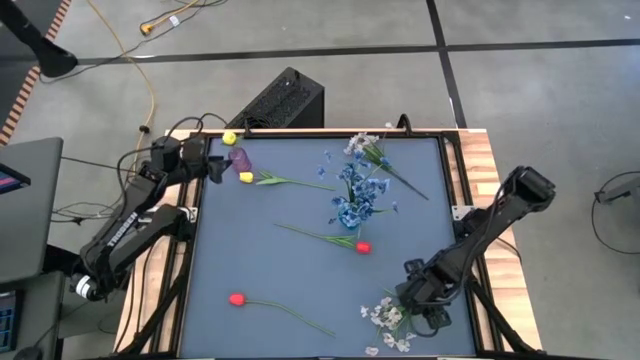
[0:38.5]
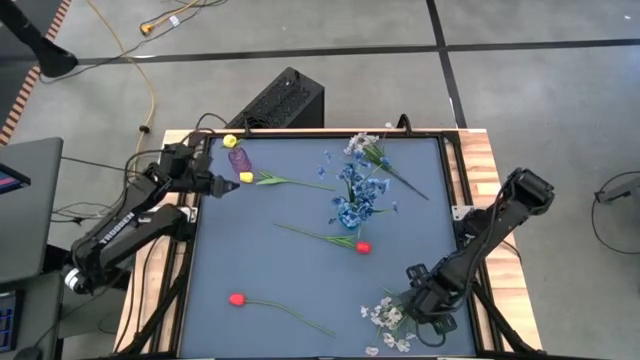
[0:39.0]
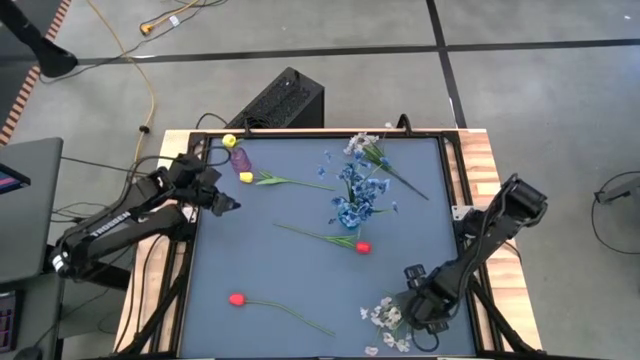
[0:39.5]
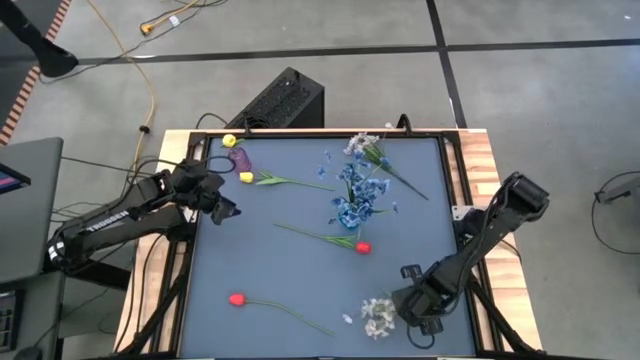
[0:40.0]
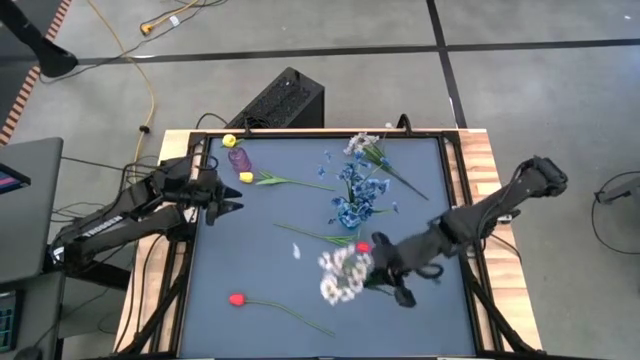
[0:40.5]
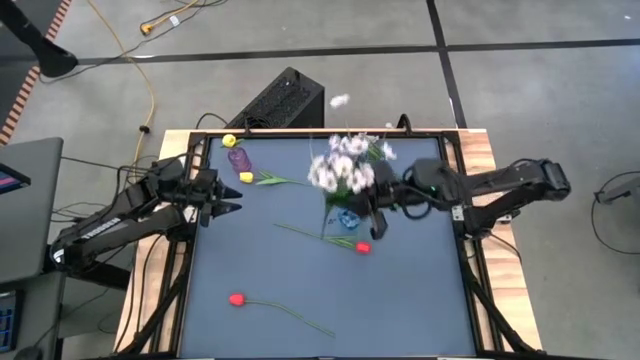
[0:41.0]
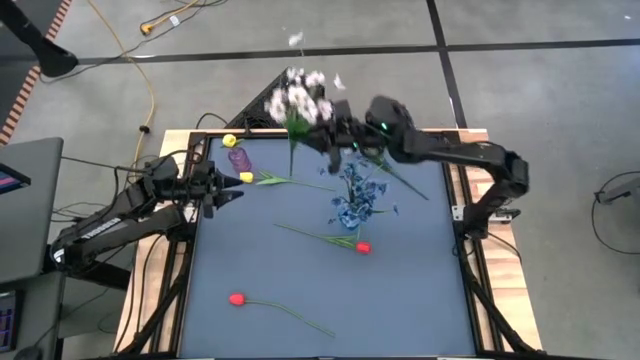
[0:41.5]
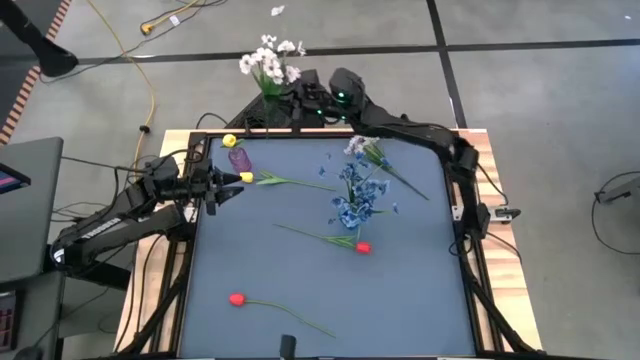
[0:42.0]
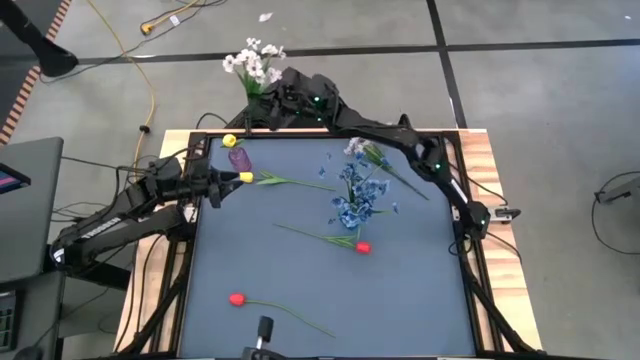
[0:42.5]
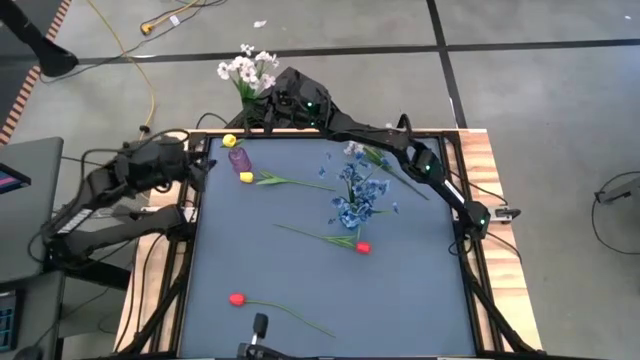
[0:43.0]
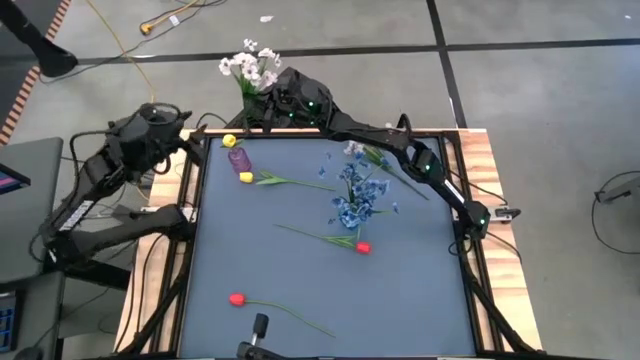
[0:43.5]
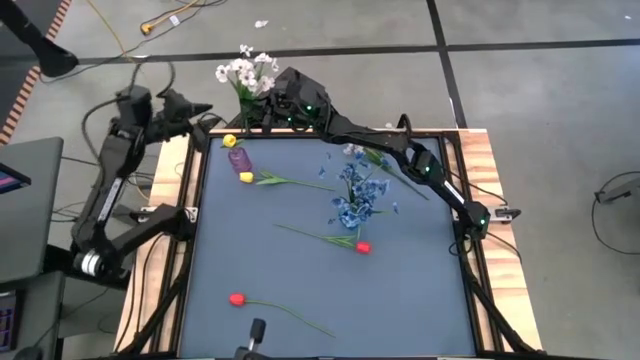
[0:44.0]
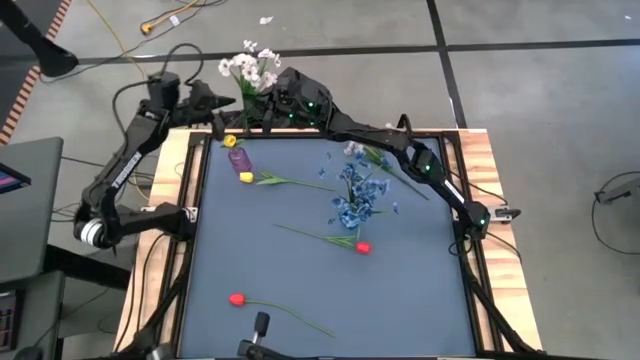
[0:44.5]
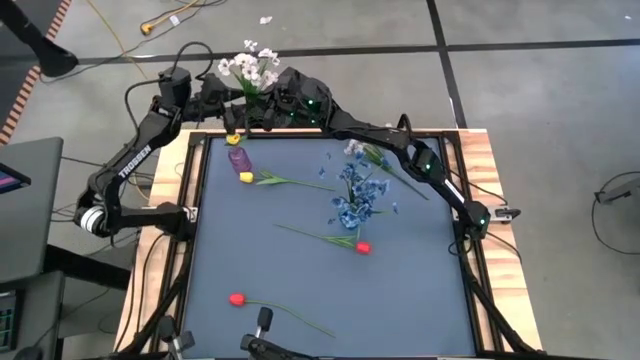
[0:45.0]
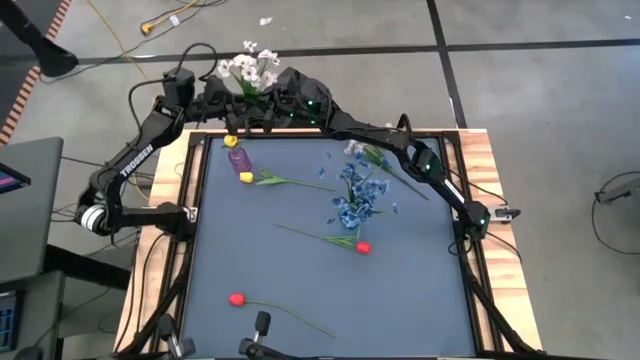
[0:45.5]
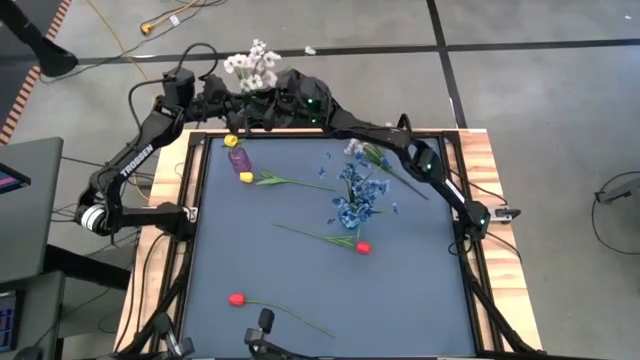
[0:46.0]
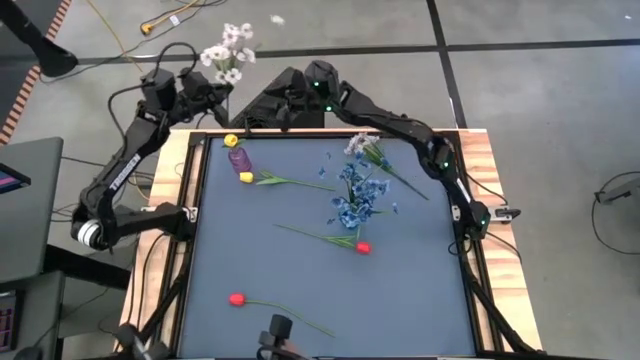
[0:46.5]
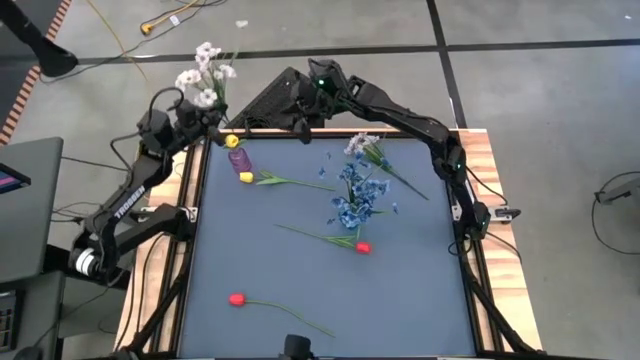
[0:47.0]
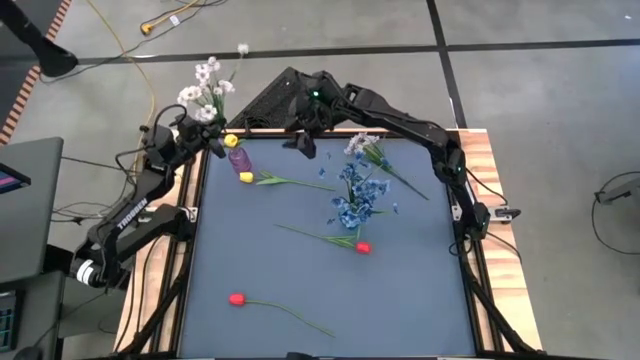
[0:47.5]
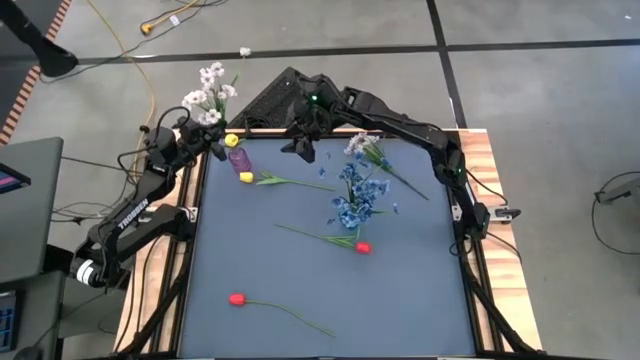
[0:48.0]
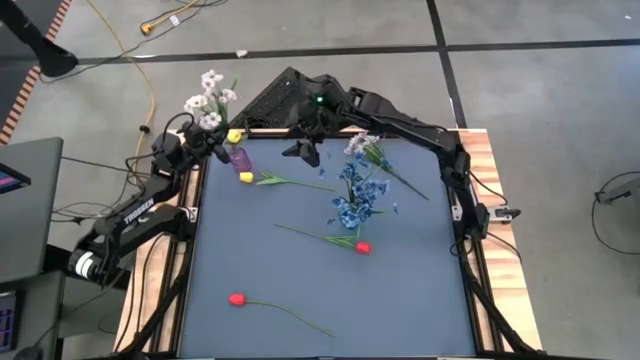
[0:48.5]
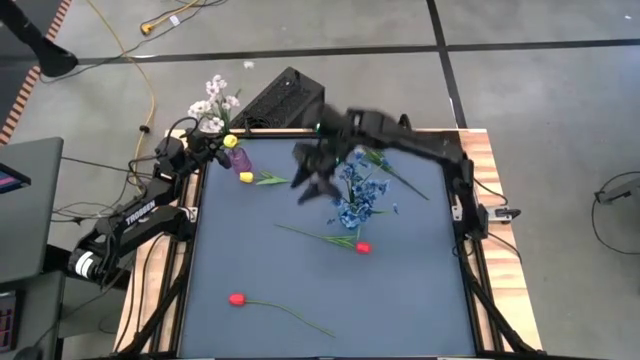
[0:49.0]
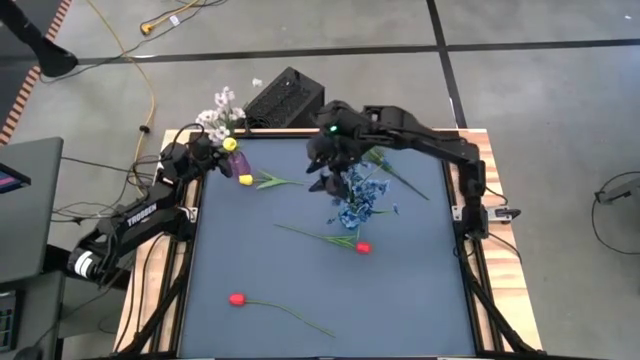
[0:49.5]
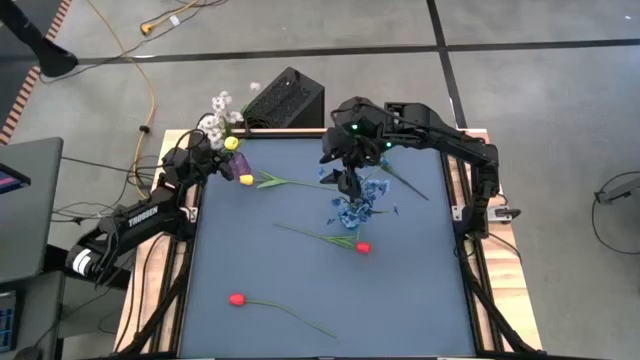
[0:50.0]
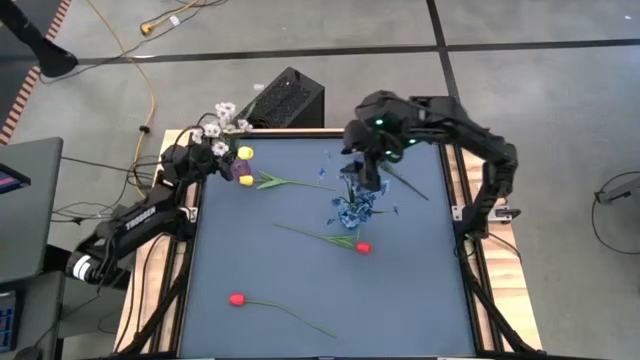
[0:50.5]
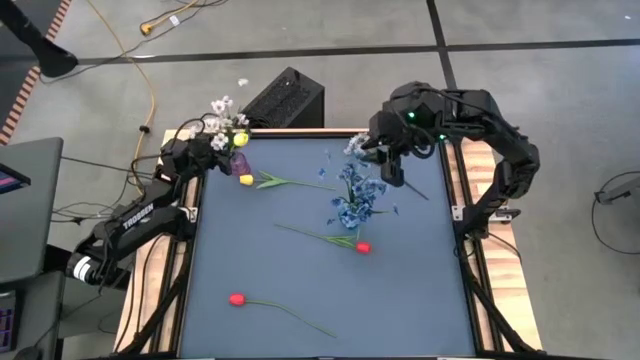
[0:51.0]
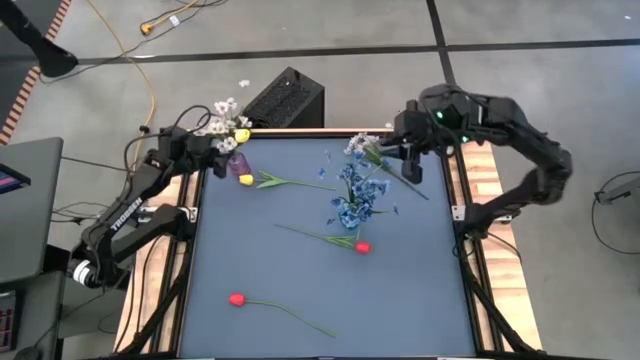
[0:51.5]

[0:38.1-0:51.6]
Task: Sort flowers into vase by color
Put the bottom white flowers into the purple vase

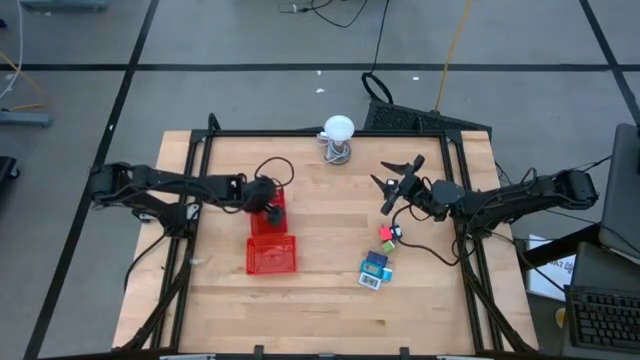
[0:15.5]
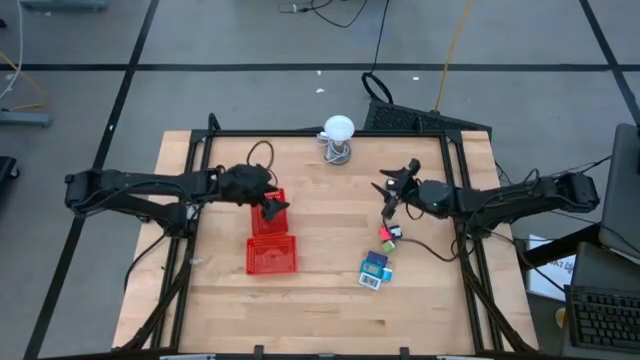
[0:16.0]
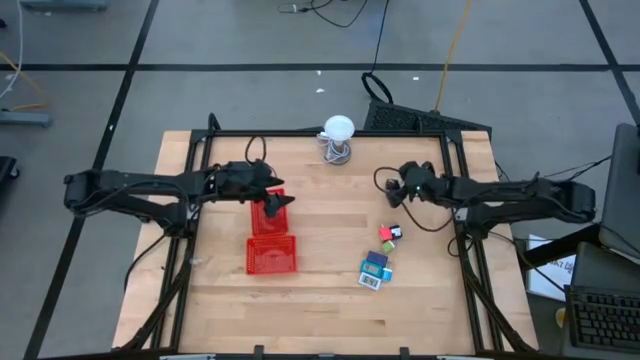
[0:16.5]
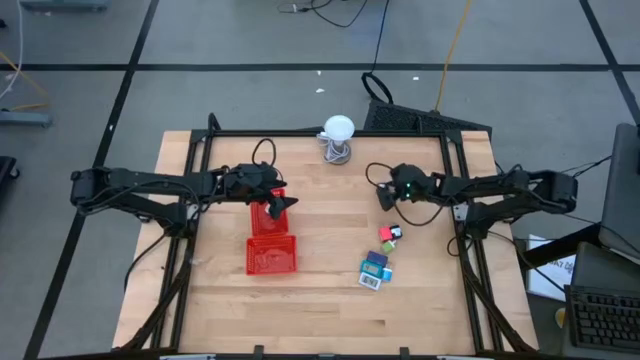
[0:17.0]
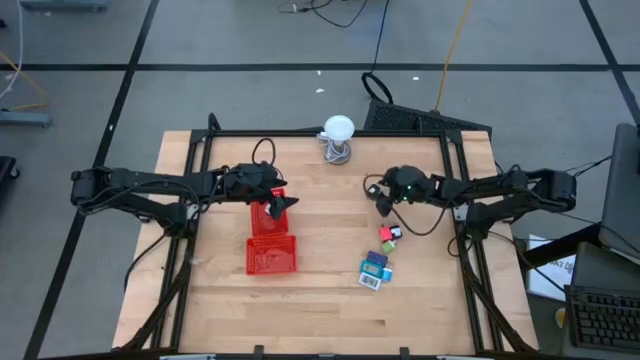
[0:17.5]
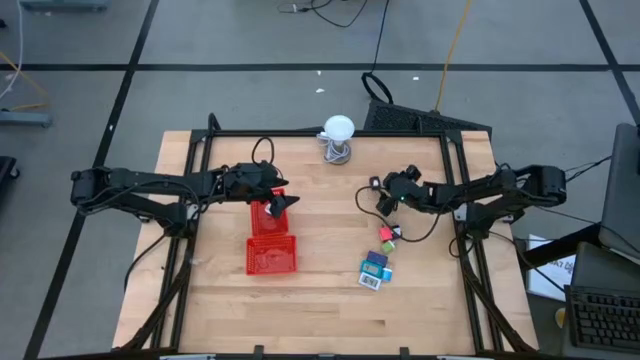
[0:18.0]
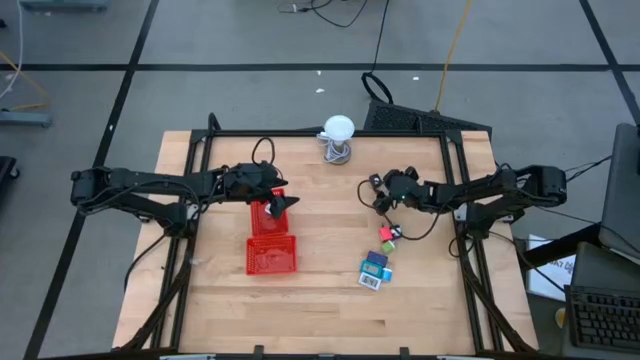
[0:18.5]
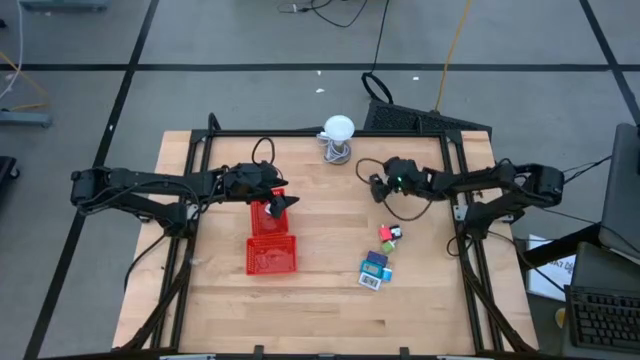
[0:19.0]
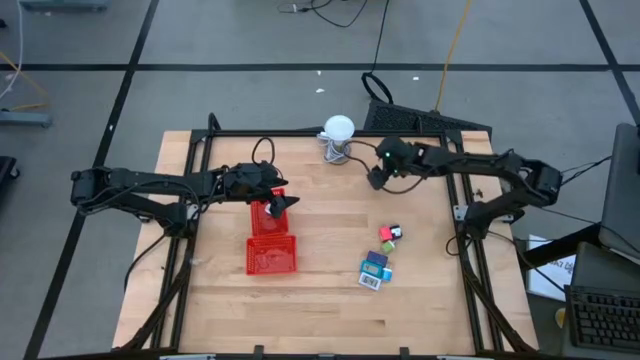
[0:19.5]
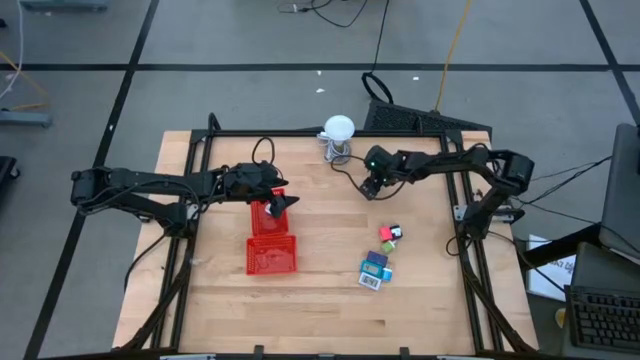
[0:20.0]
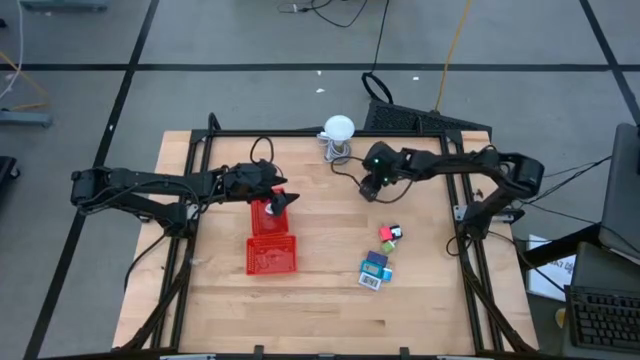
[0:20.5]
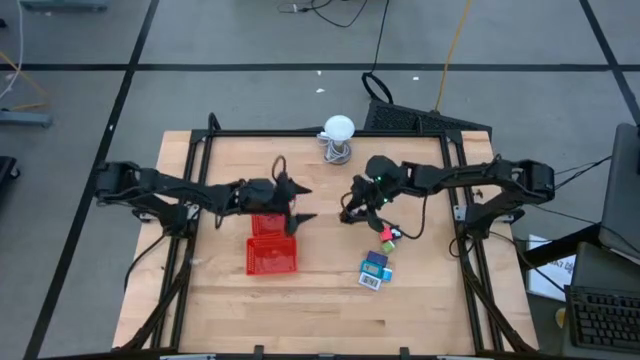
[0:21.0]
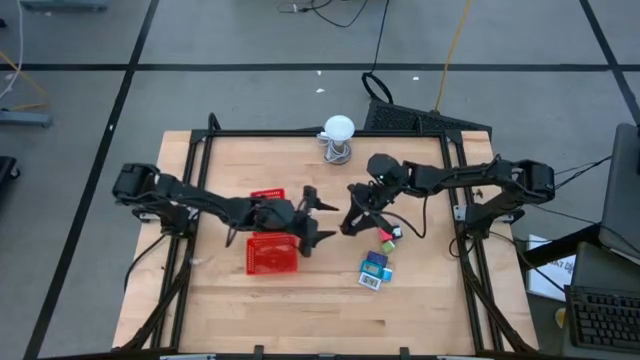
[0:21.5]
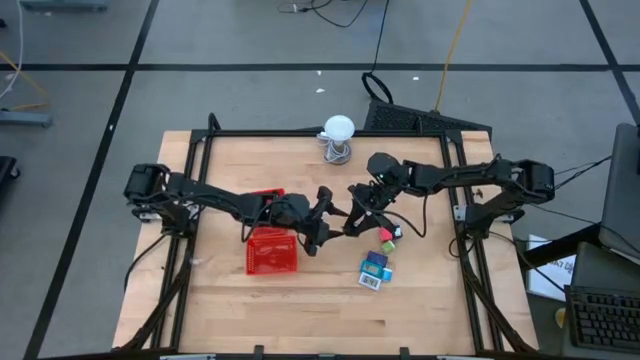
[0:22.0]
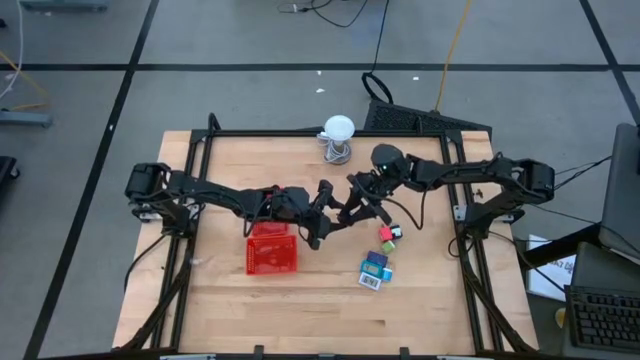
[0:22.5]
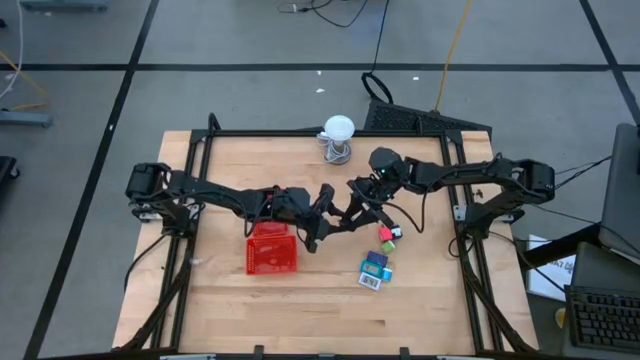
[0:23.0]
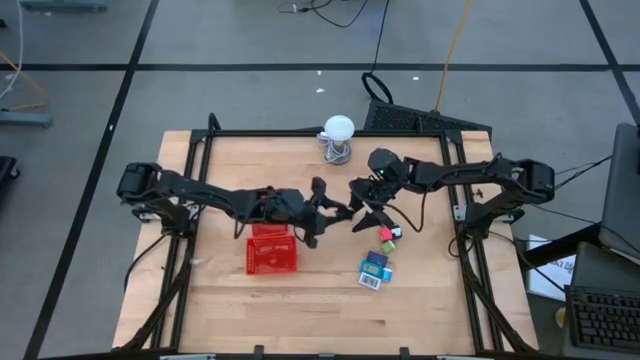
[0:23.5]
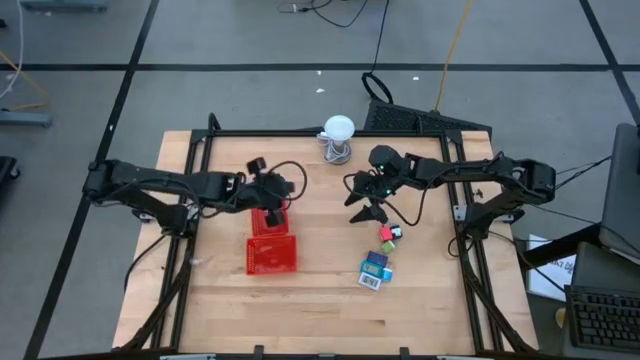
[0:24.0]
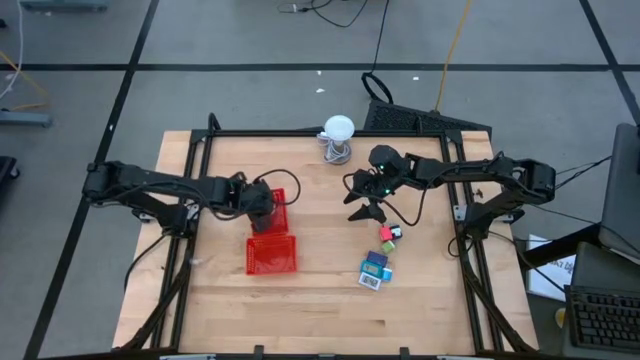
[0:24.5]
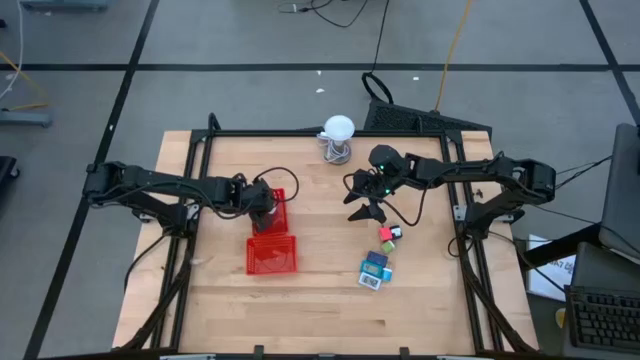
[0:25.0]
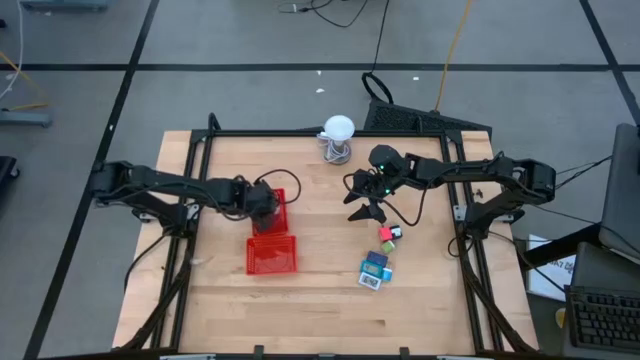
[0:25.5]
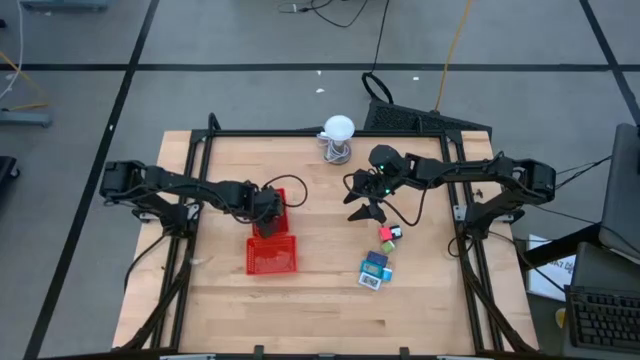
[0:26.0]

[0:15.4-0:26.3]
Task: Pick & Place Office items
Put the top black charger adapter into the top red basket
